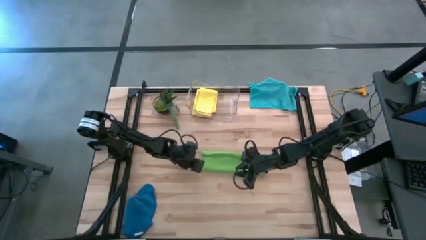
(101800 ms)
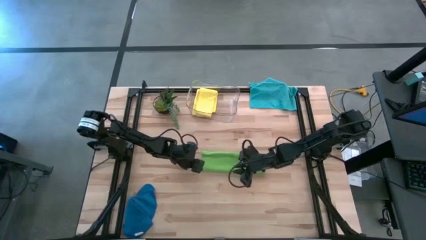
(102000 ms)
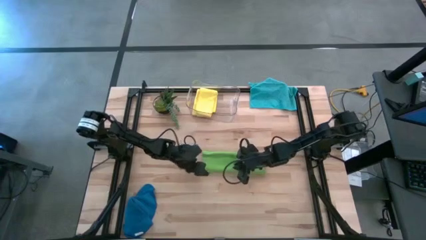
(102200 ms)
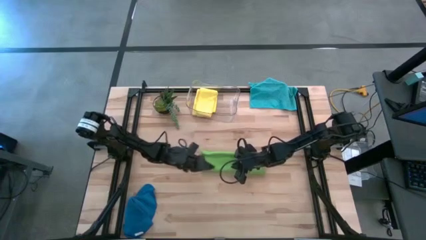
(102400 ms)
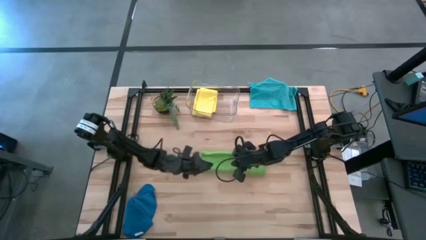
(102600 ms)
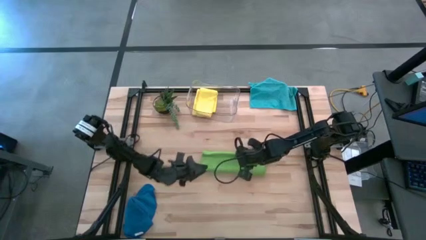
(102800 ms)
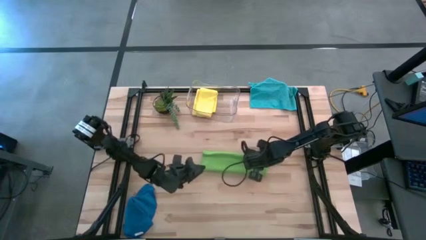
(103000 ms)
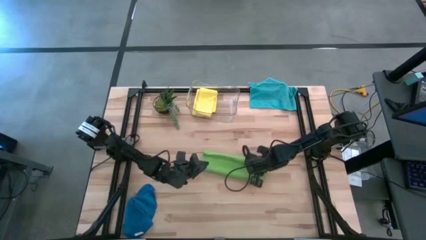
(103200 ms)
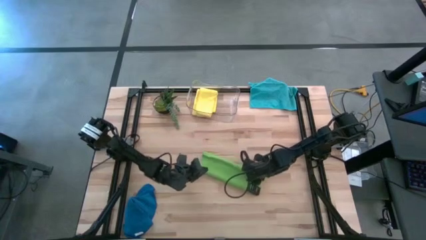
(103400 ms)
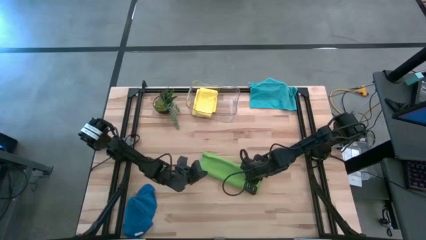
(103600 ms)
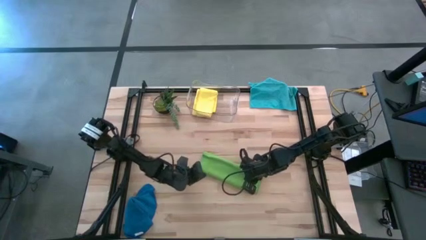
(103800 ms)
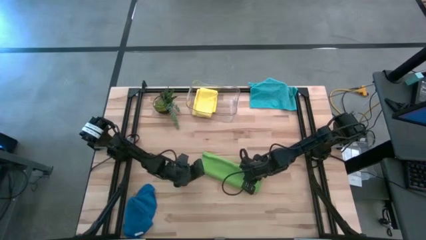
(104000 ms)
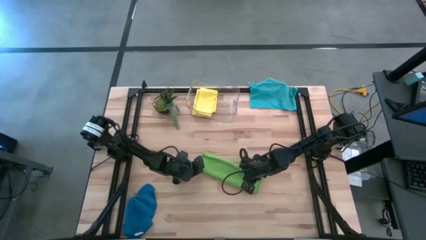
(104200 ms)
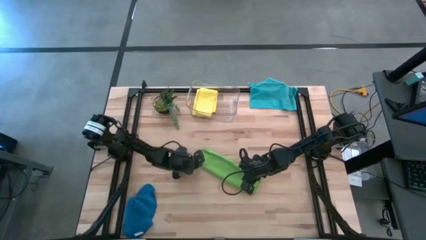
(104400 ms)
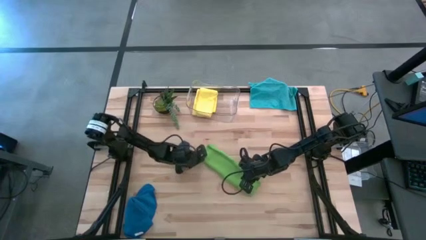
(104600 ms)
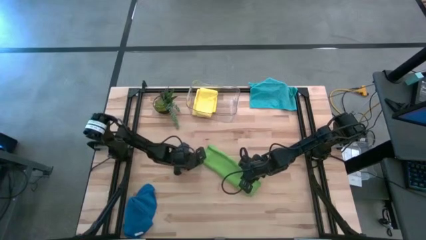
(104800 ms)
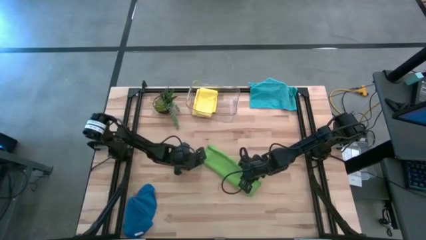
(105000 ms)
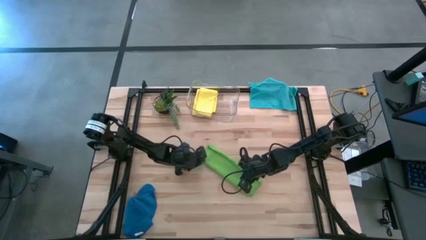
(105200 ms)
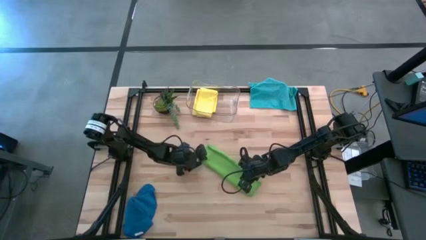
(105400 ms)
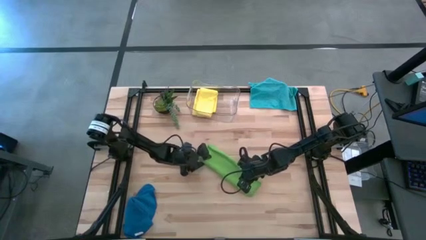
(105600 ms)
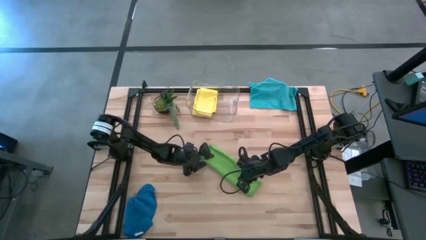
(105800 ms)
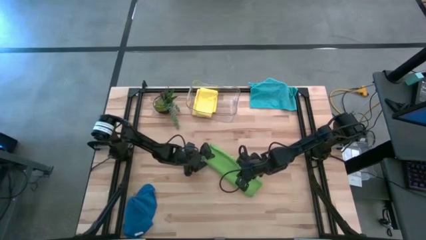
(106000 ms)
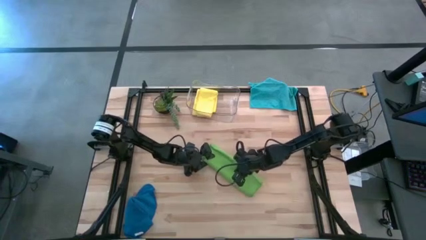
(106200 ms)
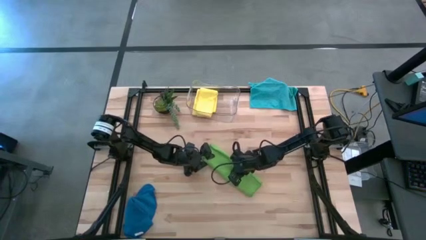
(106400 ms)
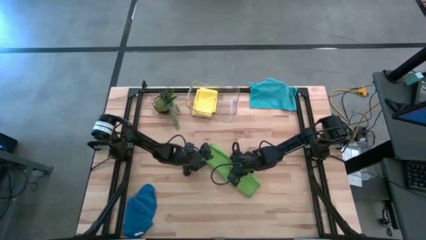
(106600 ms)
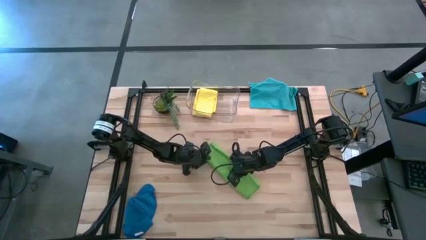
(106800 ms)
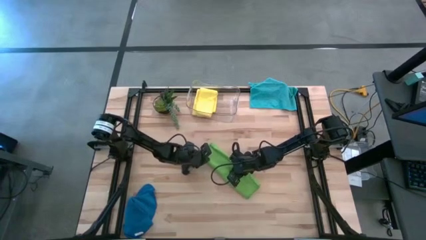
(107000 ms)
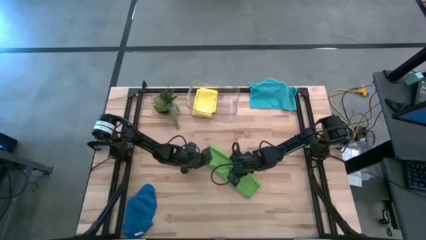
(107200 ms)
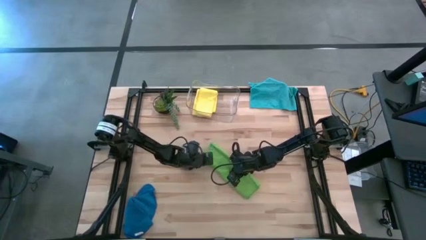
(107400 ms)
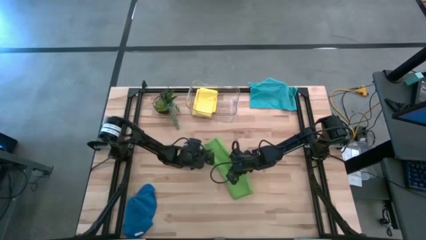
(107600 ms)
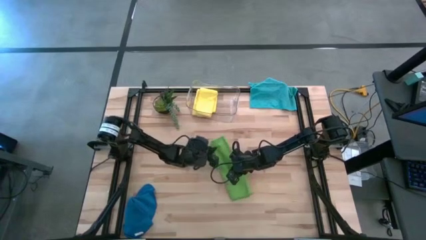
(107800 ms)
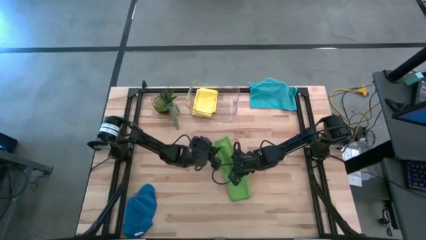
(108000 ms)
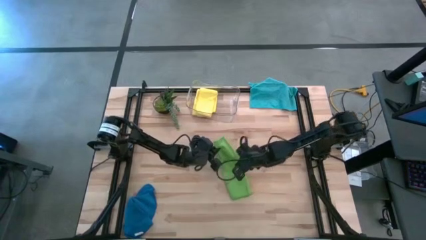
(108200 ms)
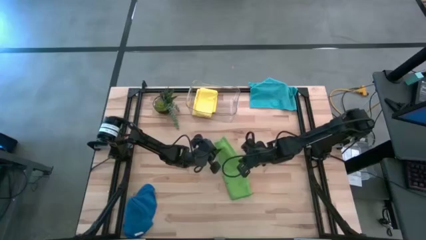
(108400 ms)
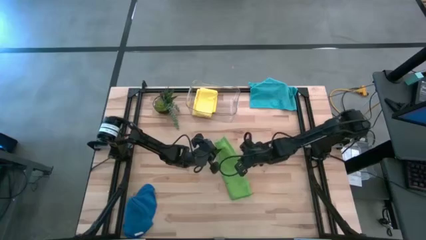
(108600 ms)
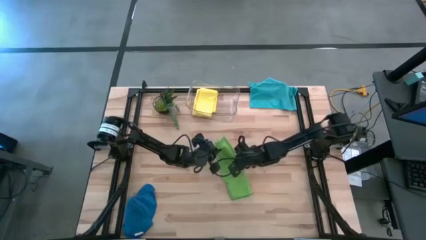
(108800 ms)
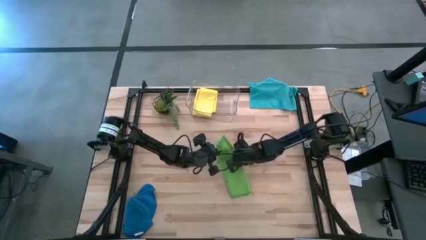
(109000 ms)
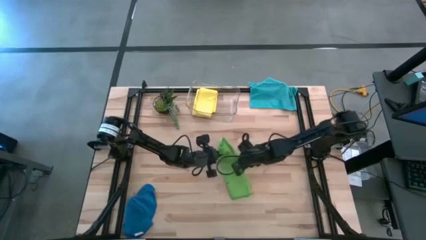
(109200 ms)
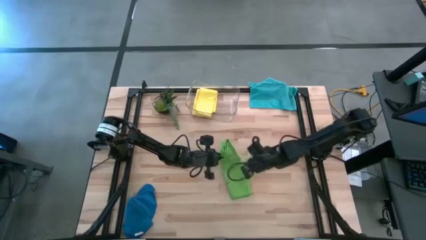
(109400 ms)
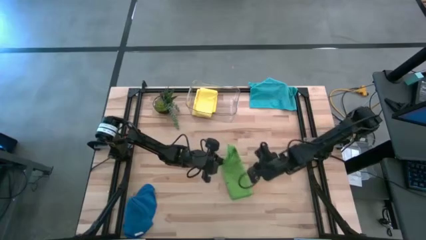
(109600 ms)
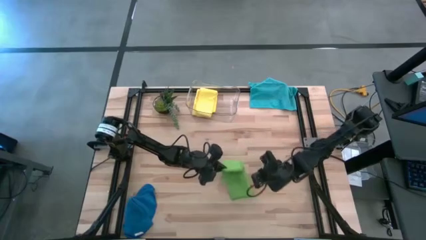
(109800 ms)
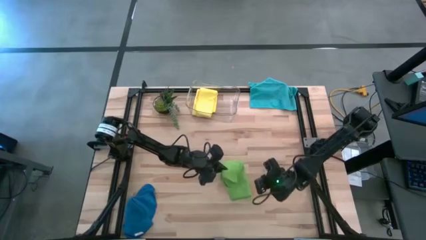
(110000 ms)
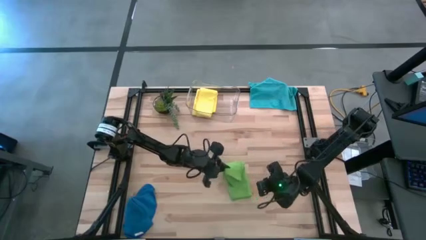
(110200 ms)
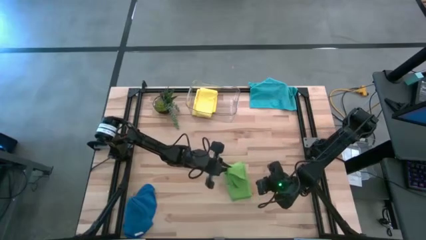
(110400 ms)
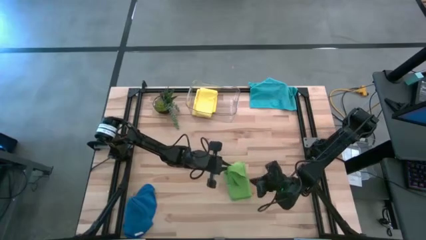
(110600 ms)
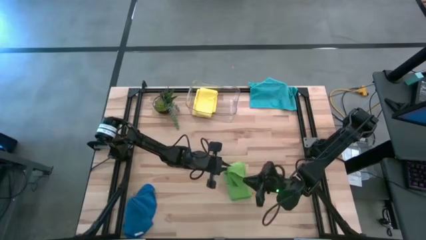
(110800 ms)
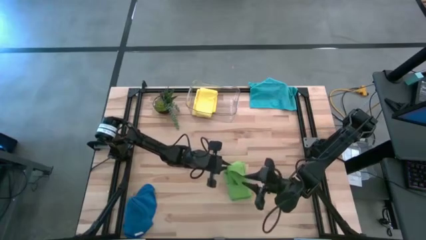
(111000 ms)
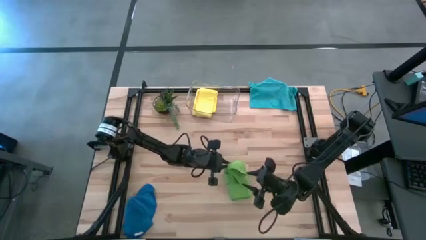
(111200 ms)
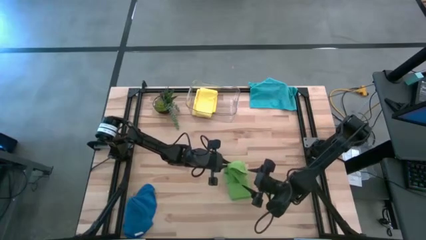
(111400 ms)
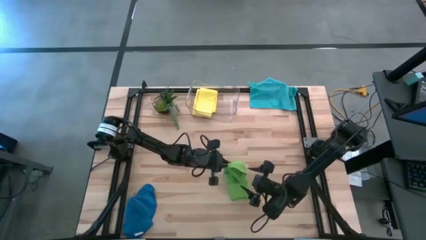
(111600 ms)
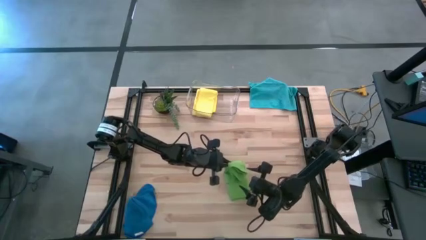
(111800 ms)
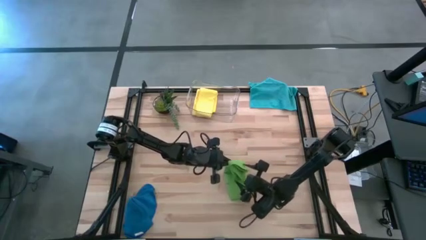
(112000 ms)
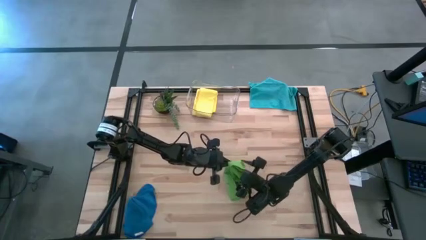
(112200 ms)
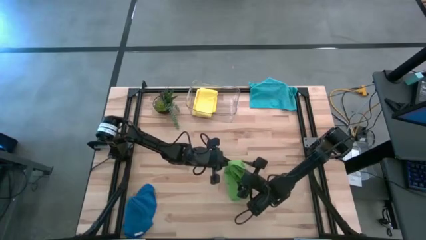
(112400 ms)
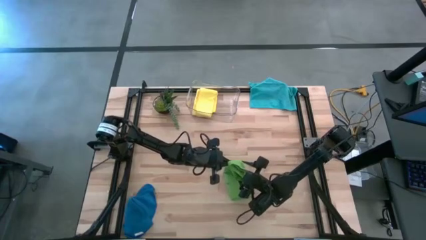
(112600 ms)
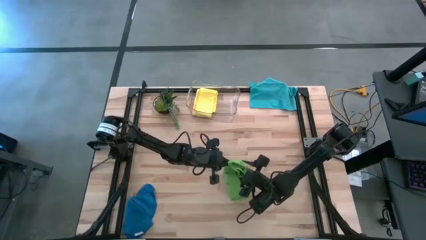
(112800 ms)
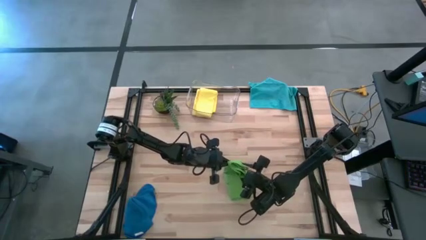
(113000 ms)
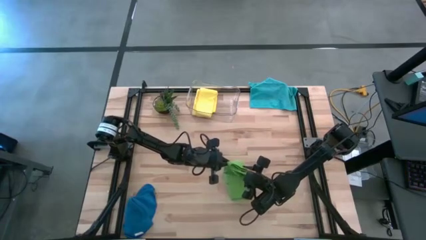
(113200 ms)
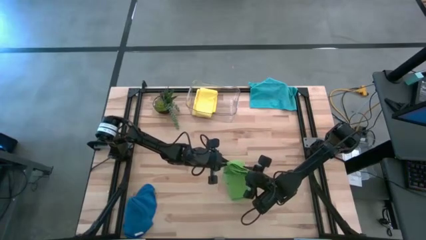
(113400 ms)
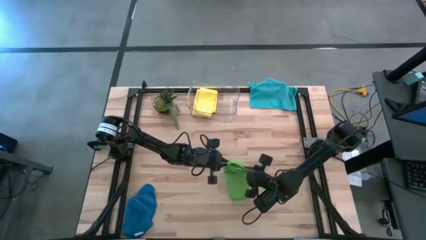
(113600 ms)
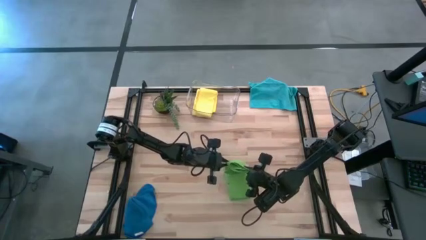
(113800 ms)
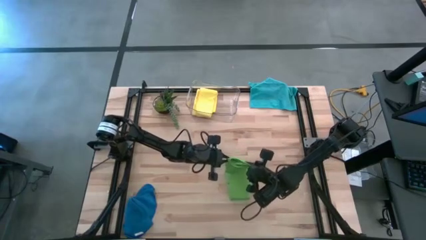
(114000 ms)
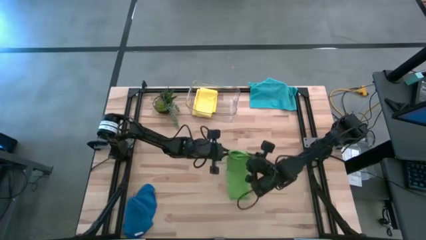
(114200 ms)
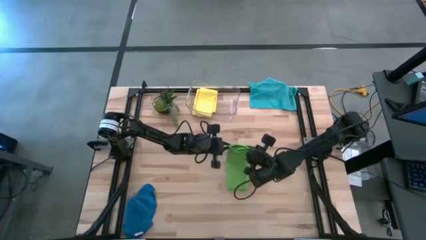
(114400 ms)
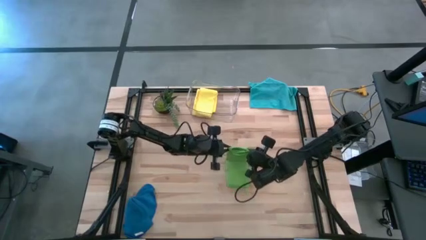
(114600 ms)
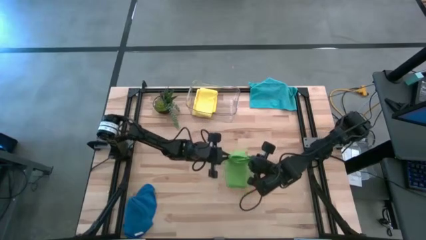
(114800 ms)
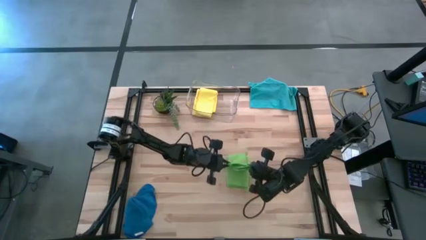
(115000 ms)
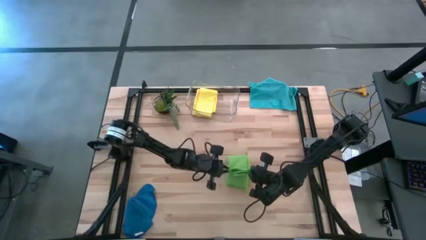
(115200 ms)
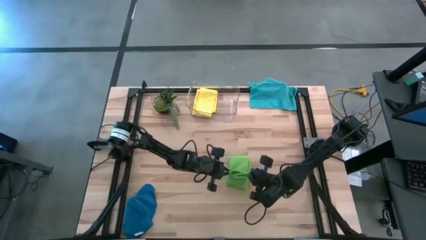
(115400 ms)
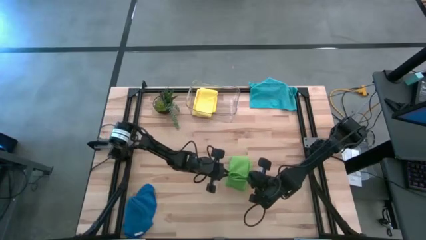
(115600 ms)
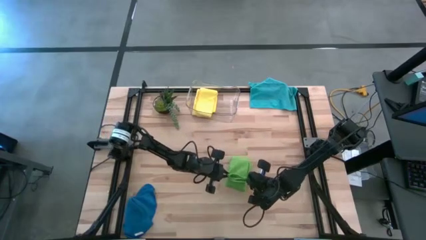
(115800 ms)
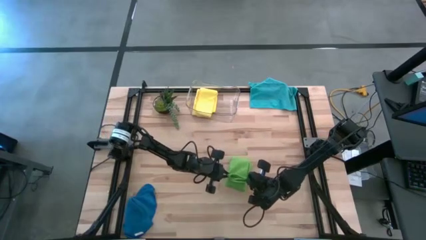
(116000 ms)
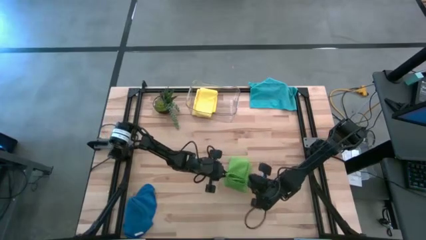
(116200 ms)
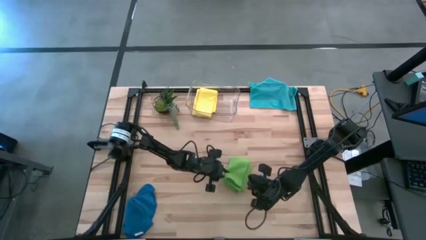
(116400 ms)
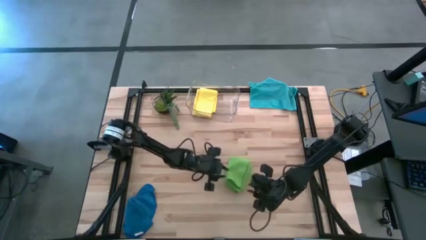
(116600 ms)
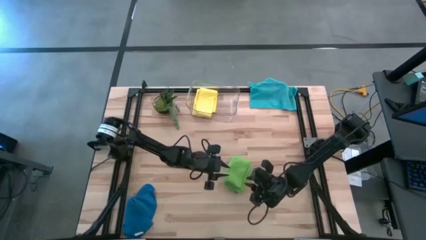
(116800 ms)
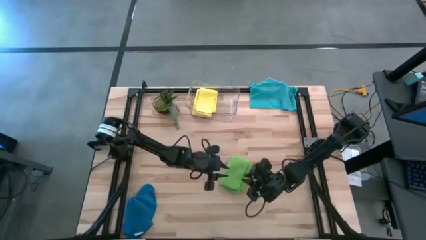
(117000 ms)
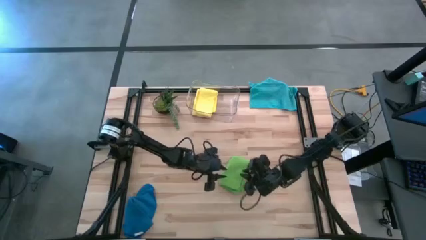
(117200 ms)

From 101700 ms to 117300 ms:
Task: Fold microfiber towels
Fold the green towel
